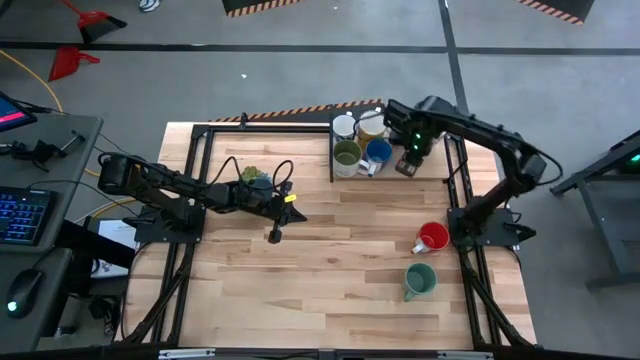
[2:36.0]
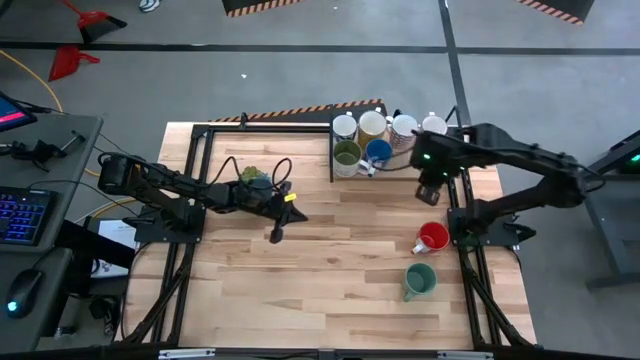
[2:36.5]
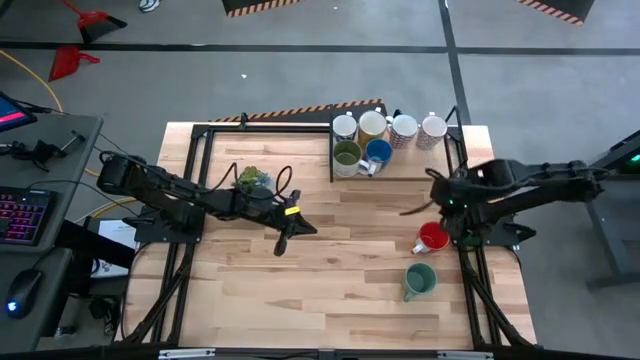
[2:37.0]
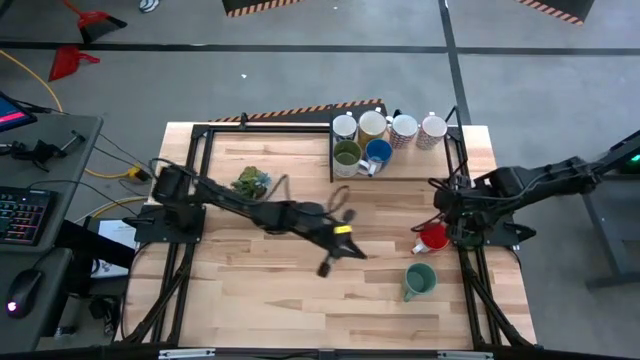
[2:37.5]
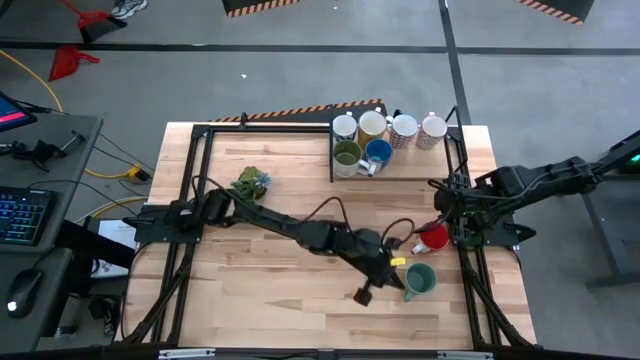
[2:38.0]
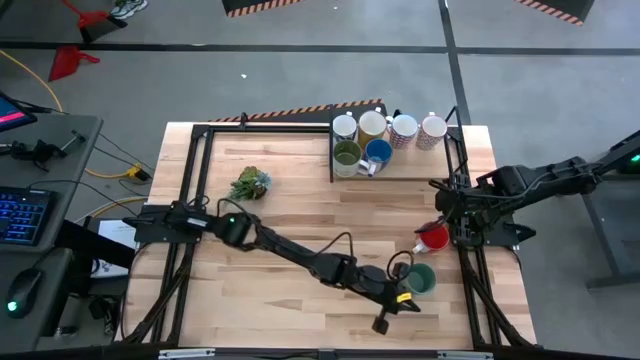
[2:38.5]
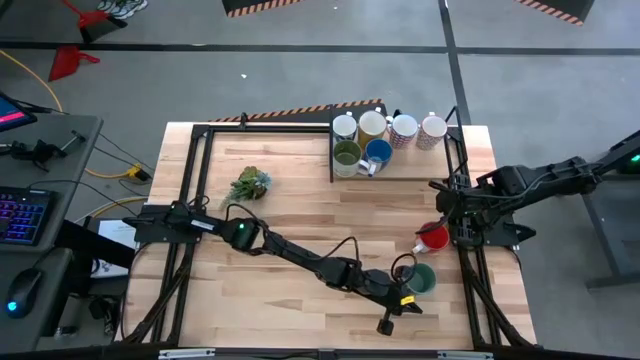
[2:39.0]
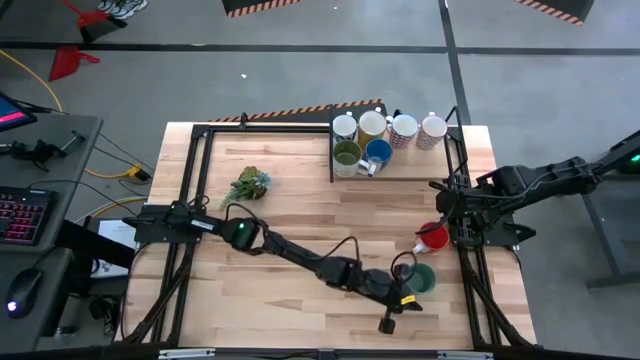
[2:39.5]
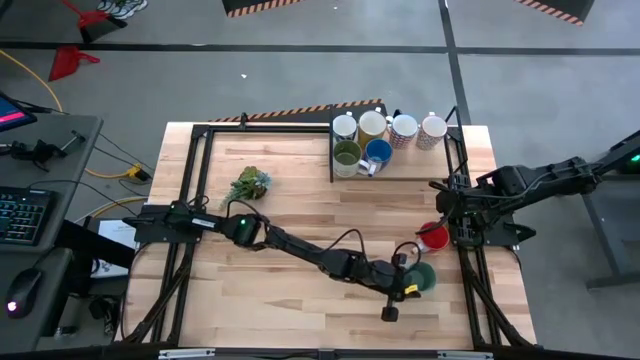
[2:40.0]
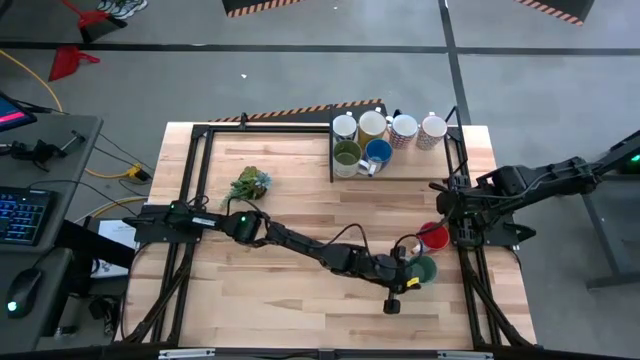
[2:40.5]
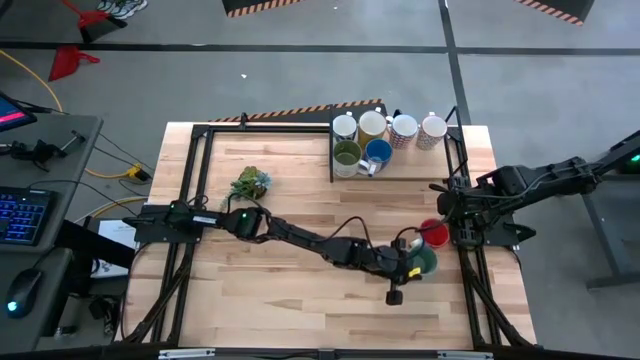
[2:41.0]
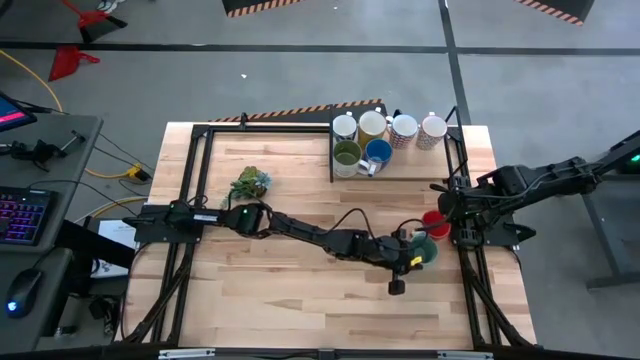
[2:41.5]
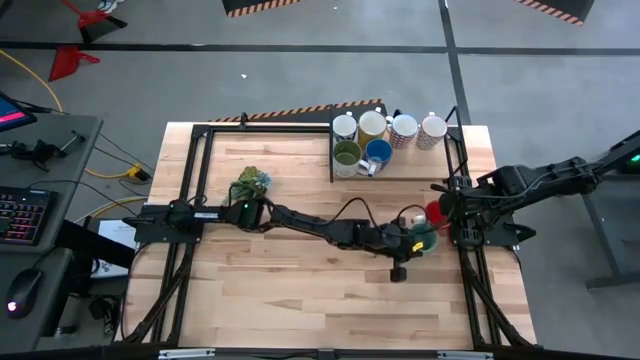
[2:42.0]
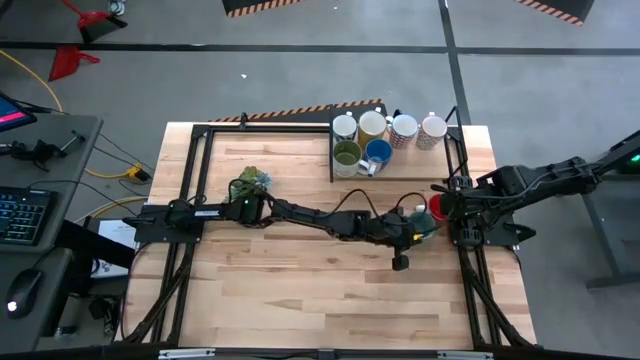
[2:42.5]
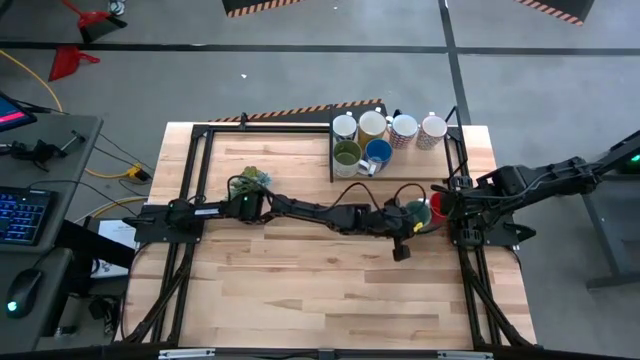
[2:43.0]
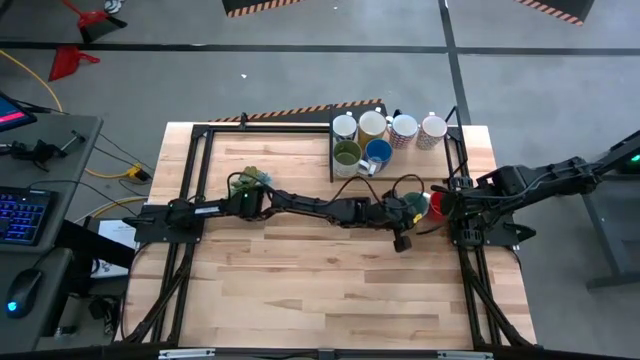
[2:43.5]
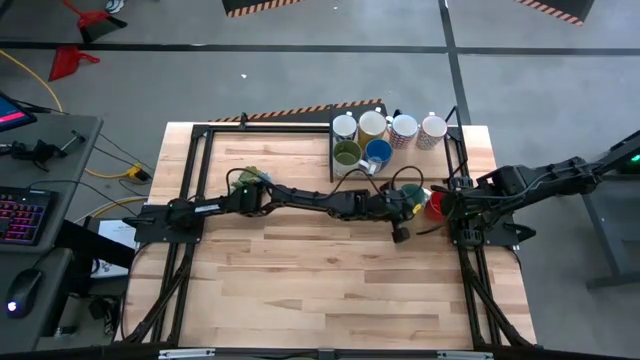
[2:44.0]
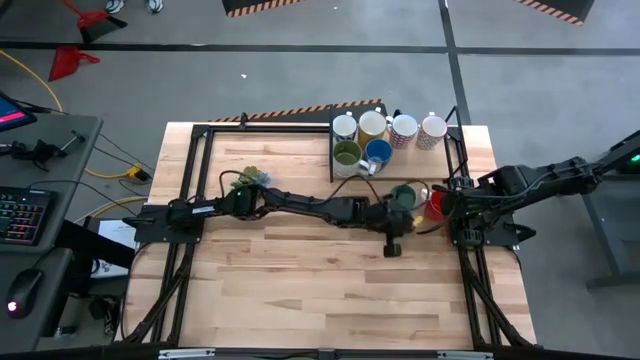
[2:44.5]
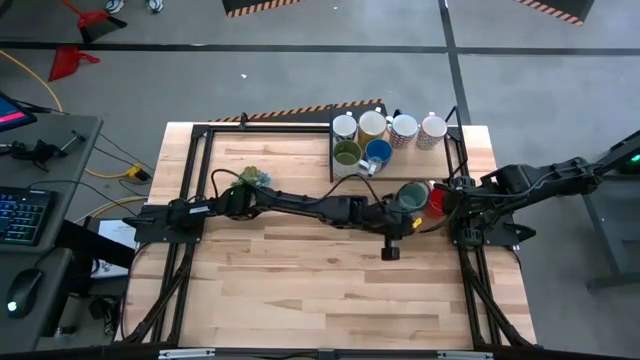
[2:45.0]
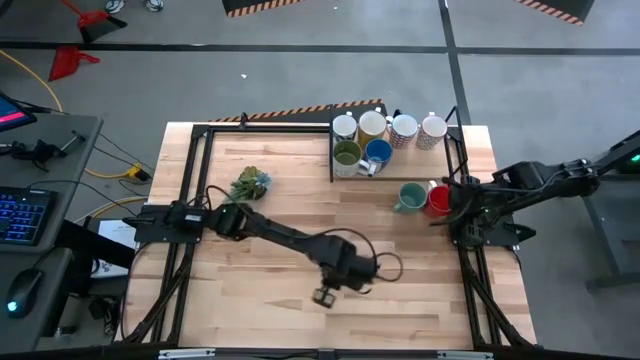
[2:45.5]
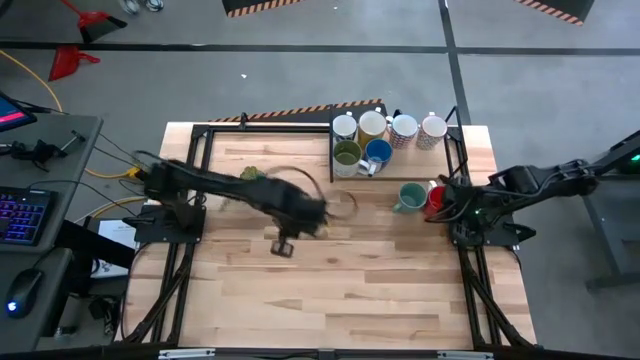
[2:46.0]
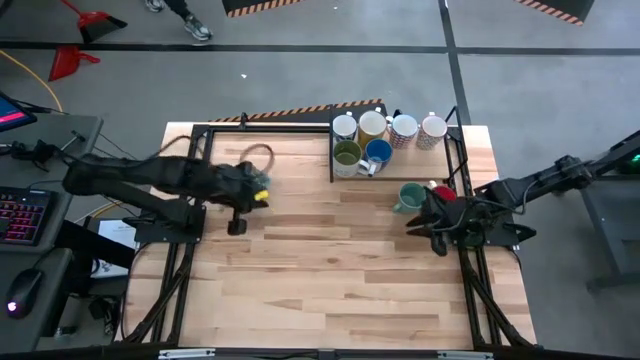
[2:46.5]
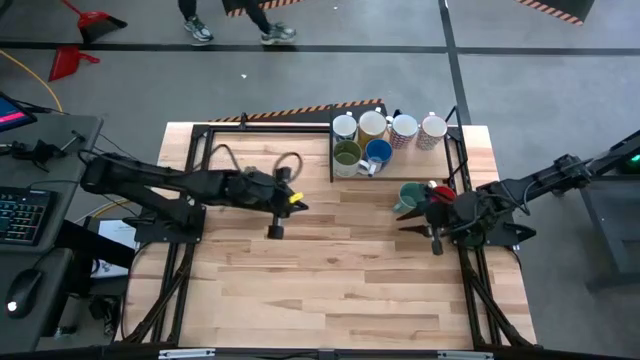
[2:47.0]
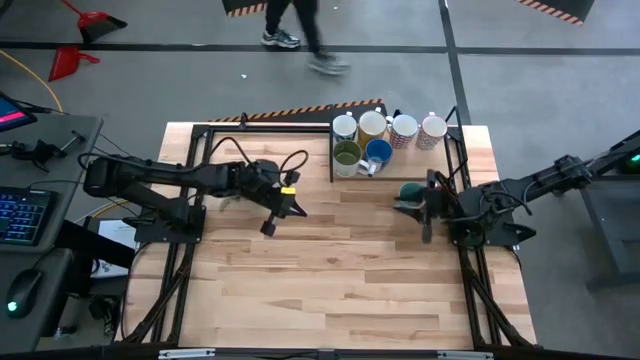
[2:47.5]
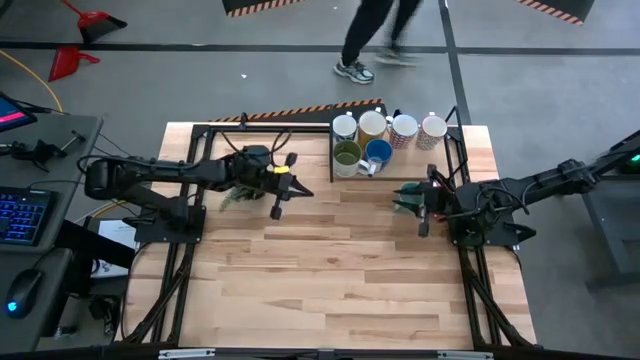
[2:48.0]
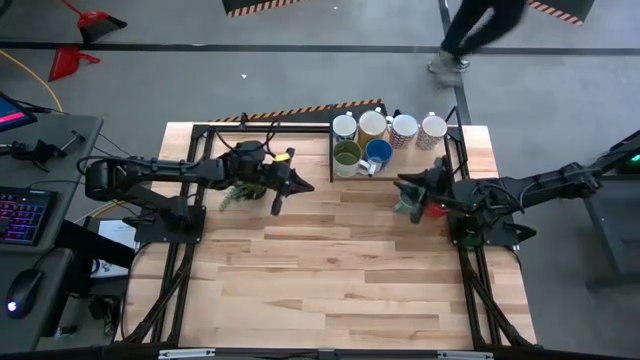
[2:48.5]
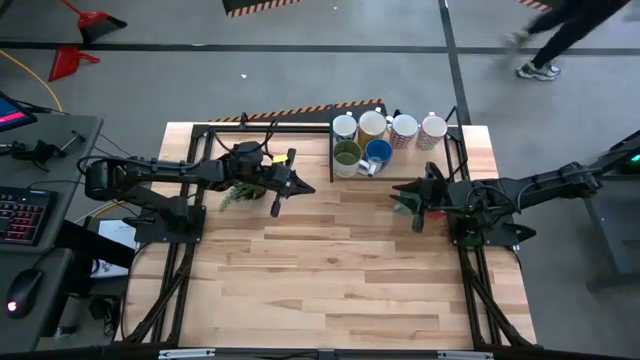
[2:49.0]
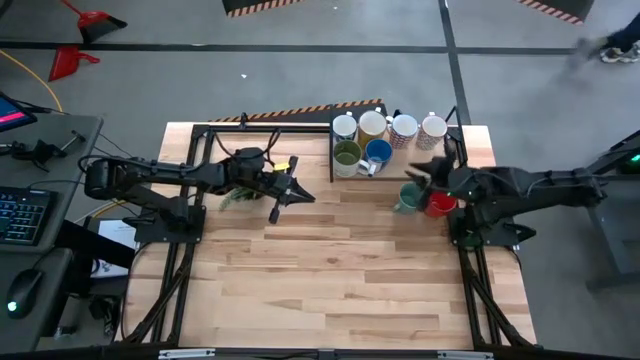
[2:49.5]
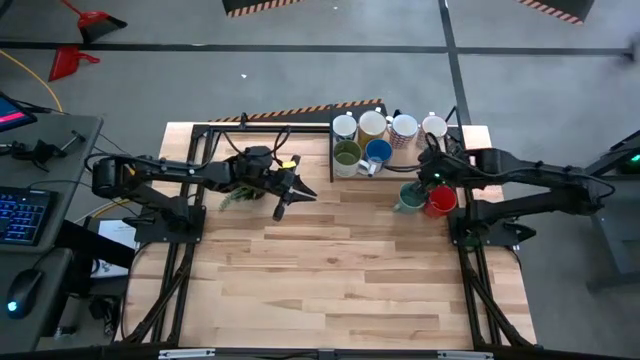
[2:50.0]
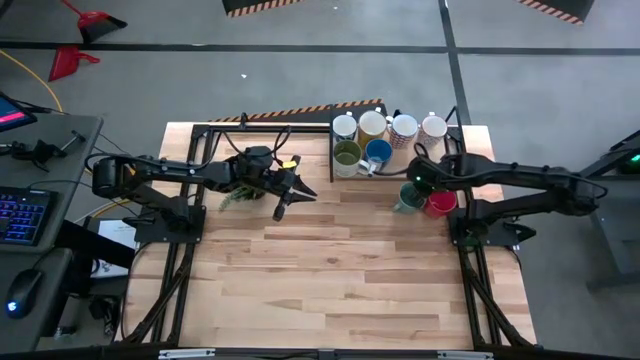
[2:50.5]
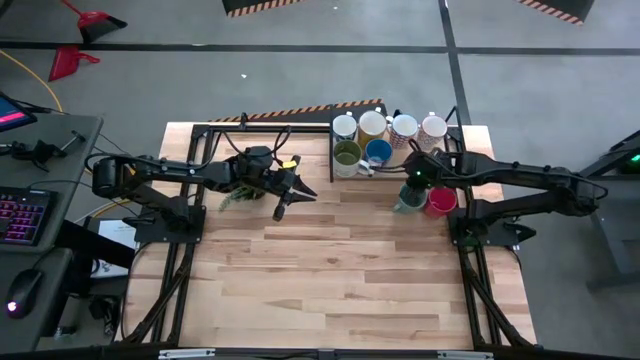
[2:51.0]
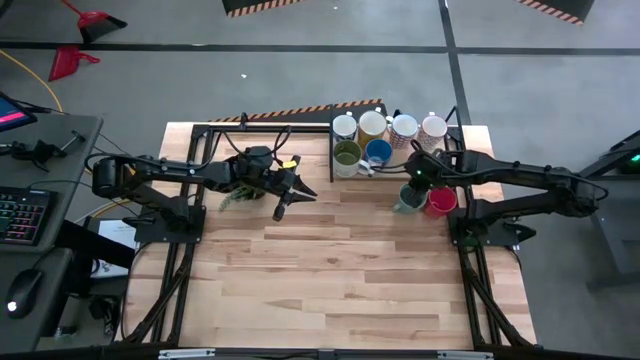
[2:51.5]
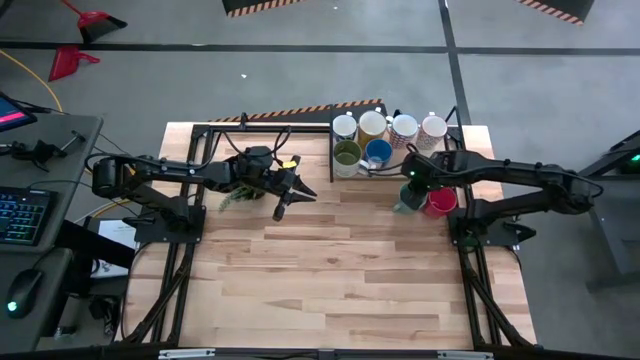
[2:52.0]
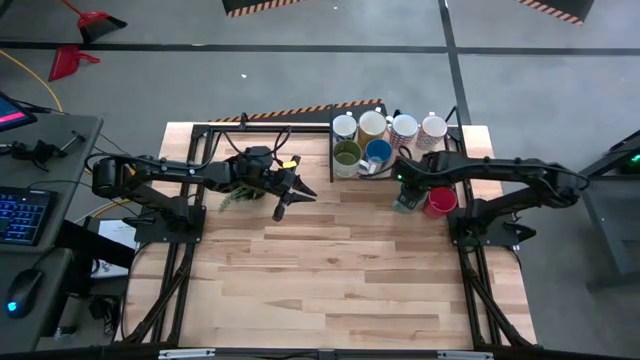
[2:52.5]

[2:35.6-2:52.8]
Task: Place coffee mugs
Put the green mug on the shelf
